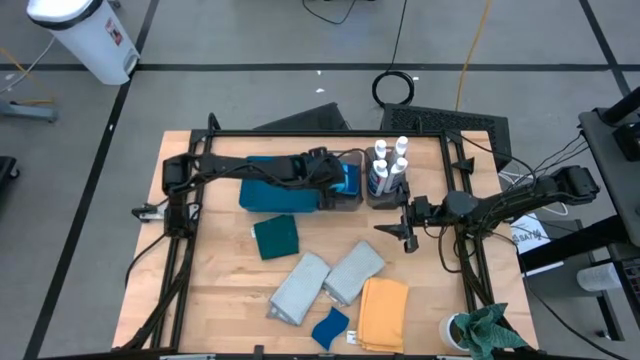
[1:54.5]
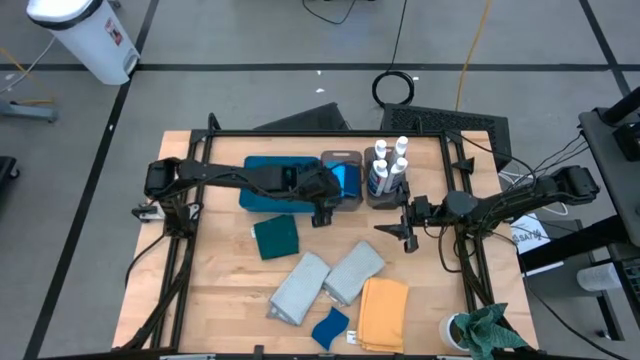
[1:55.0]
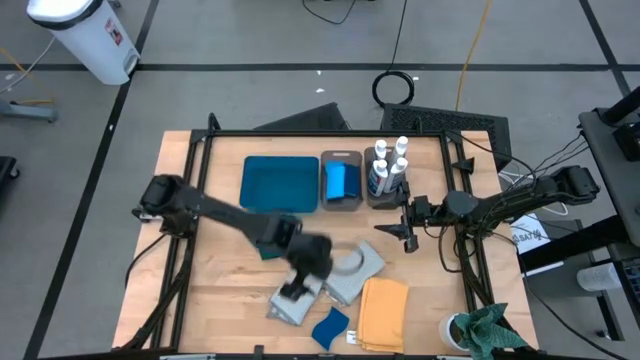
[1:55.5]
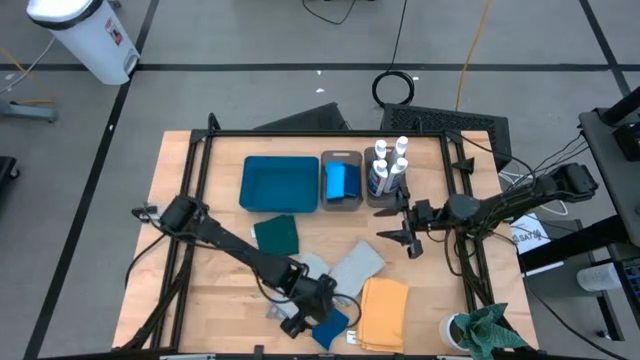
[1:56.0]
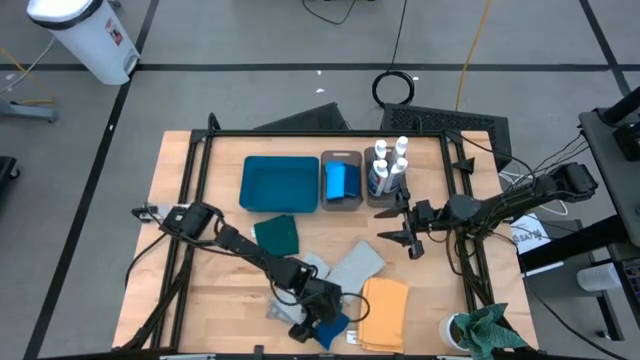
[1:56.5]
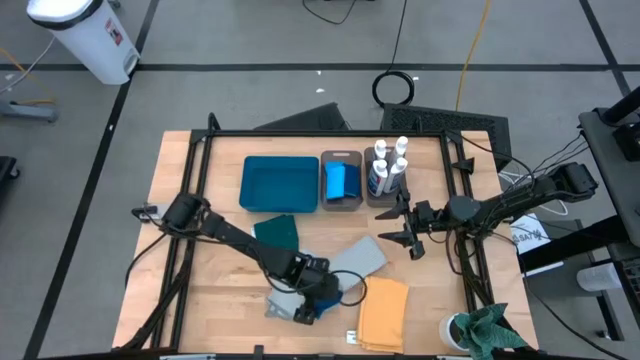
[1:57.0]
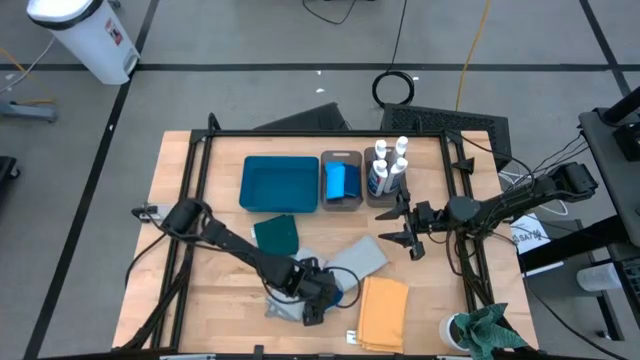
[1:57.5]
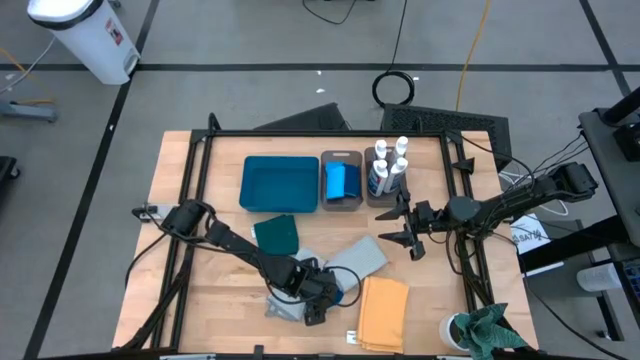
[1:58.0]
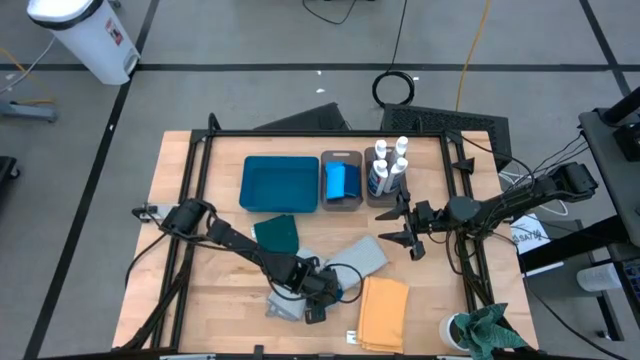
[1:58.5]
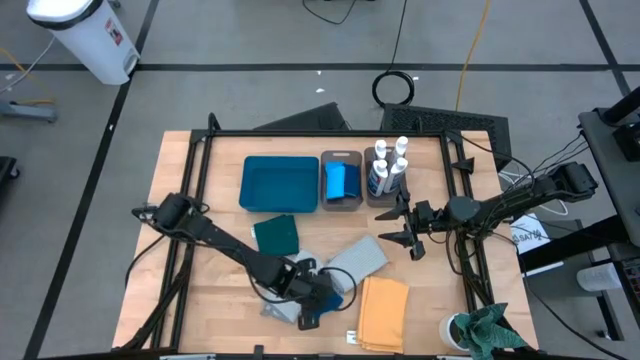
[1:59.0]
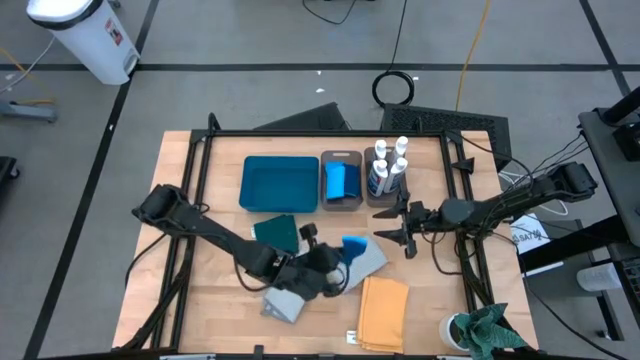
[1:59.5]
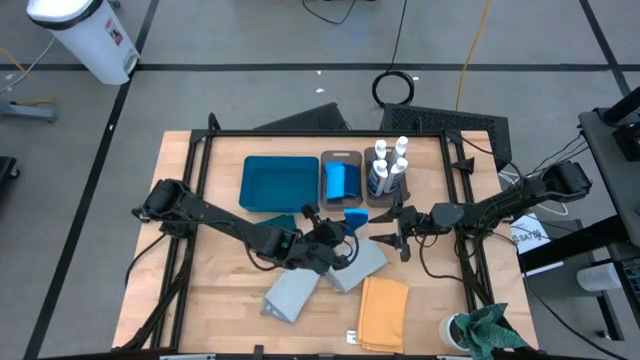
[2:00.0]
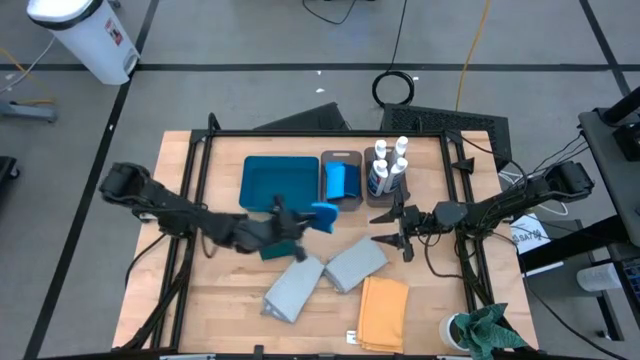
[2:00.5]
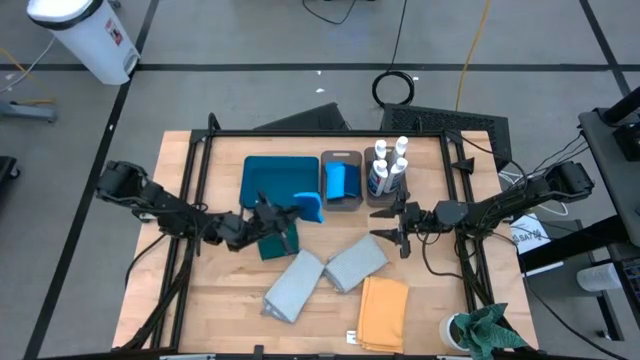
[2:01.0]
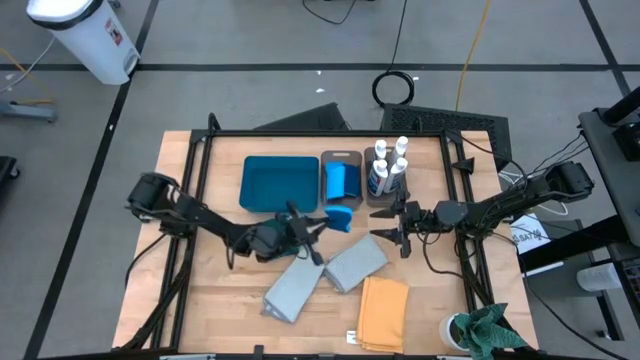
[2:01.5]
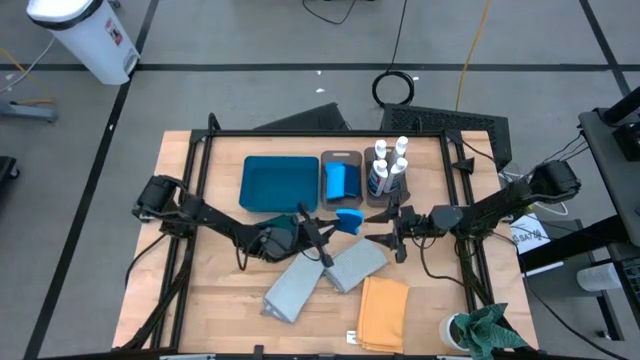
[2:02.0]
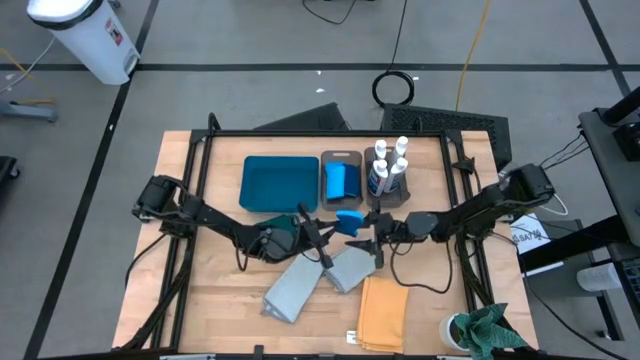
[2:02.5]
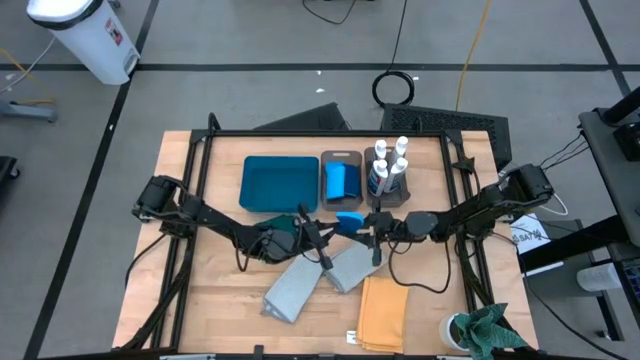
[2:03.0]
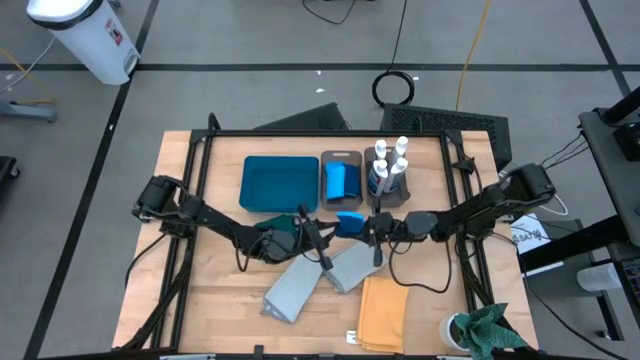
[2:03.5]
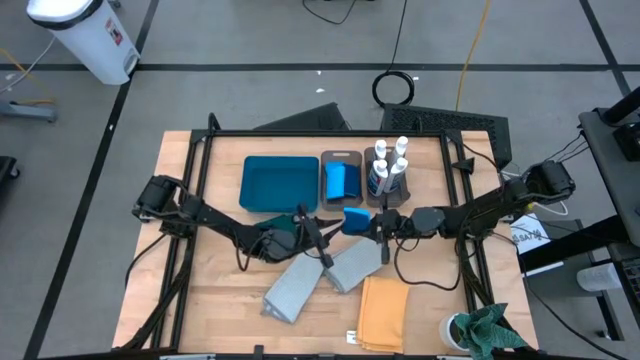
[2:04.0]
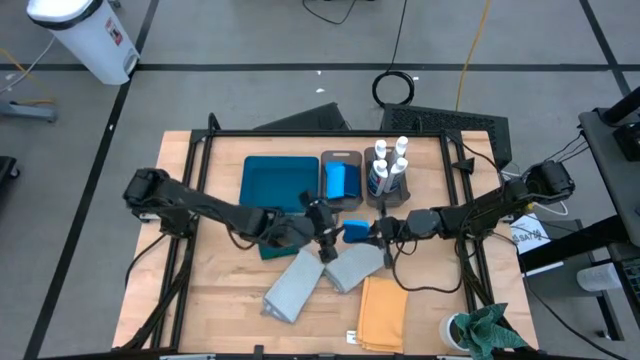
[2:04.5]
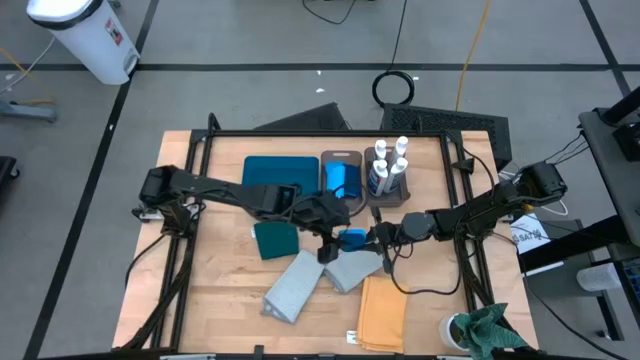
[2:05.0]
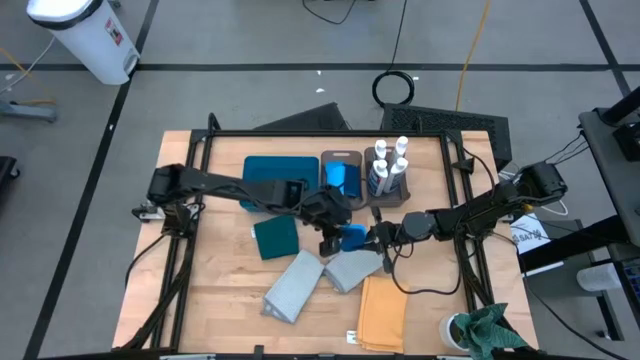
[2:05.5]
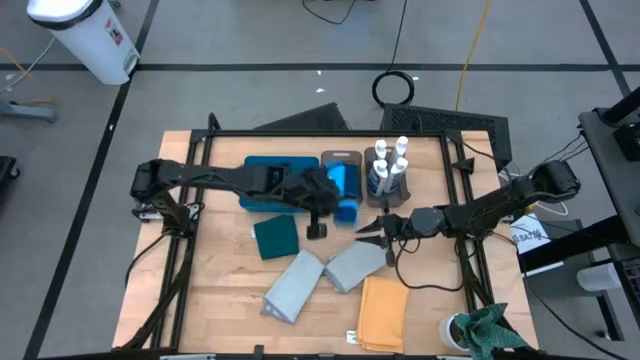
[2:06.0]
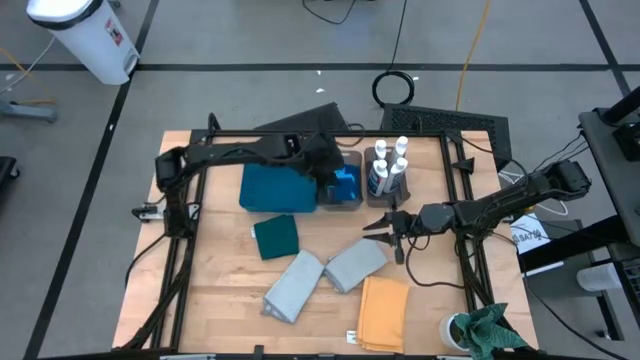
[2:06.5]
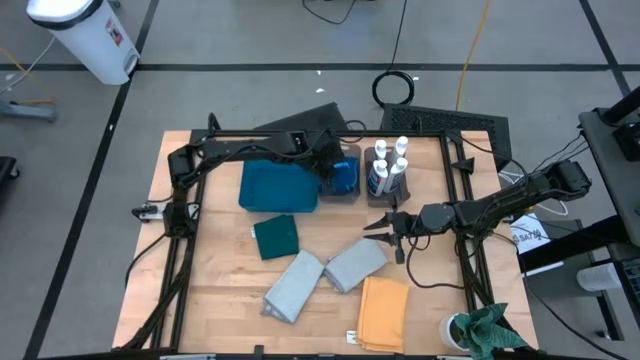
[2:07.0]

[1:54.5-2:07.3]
Task: Pick & Place Kitchen Items
Put the blue sponge into the left black bin

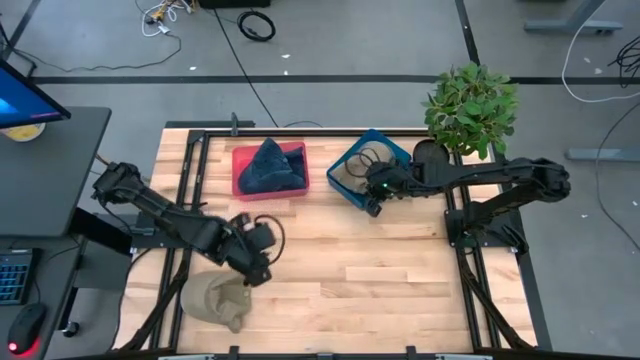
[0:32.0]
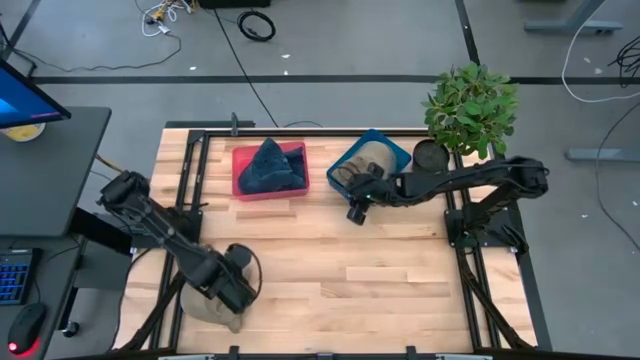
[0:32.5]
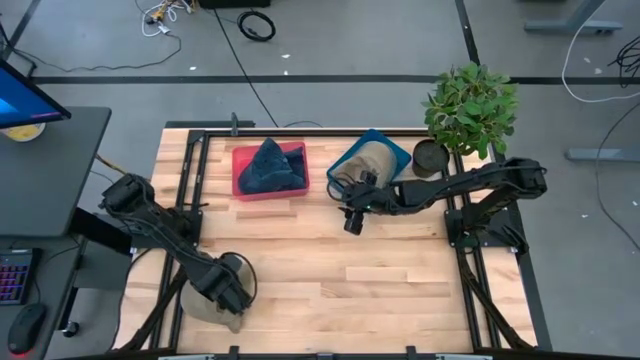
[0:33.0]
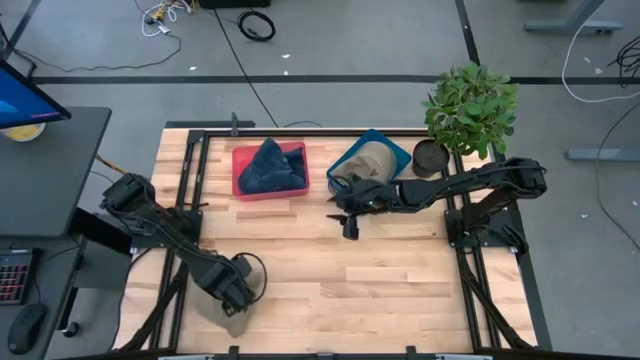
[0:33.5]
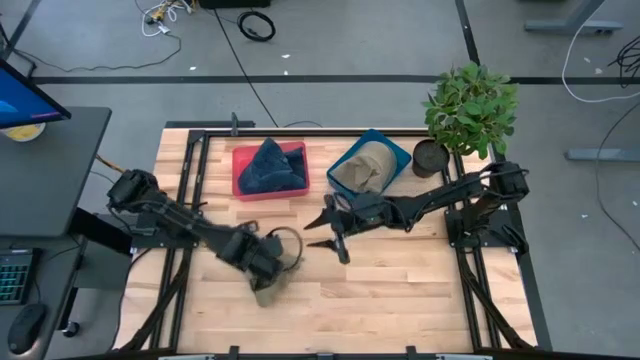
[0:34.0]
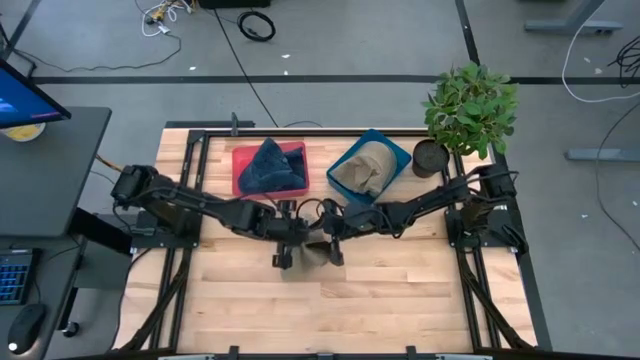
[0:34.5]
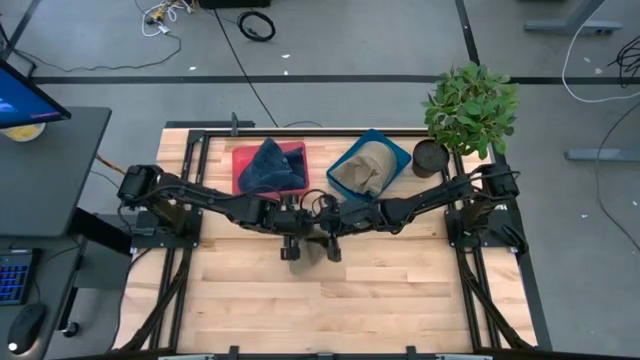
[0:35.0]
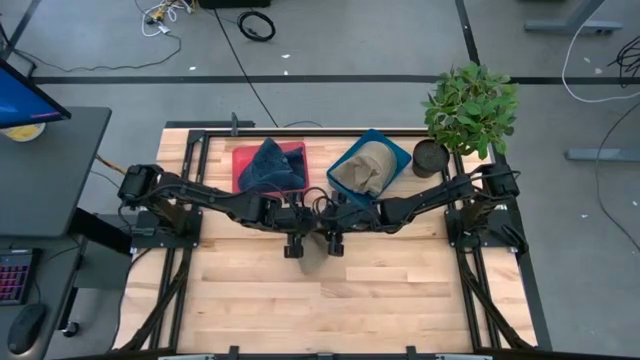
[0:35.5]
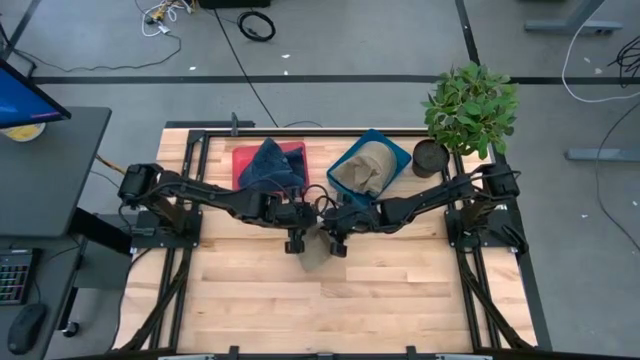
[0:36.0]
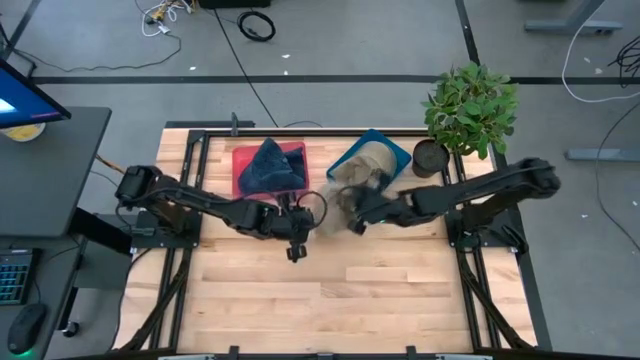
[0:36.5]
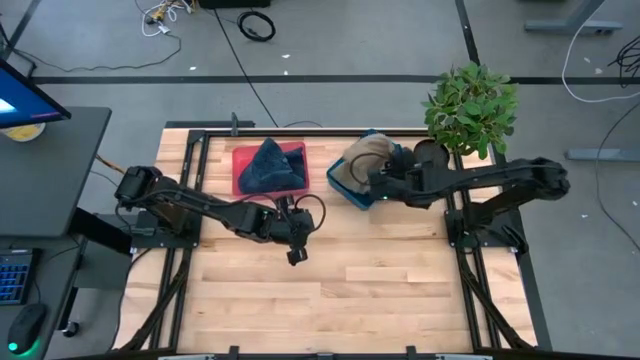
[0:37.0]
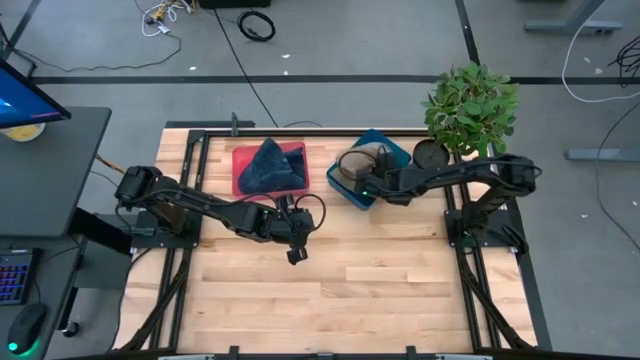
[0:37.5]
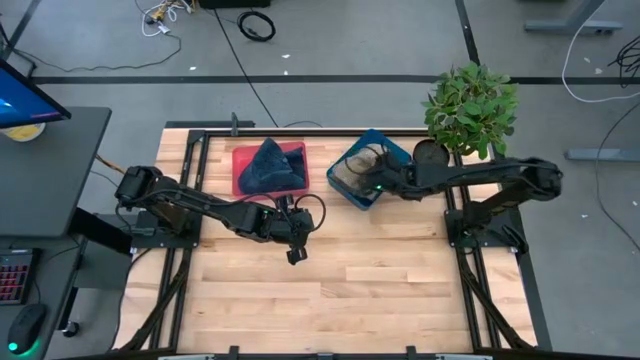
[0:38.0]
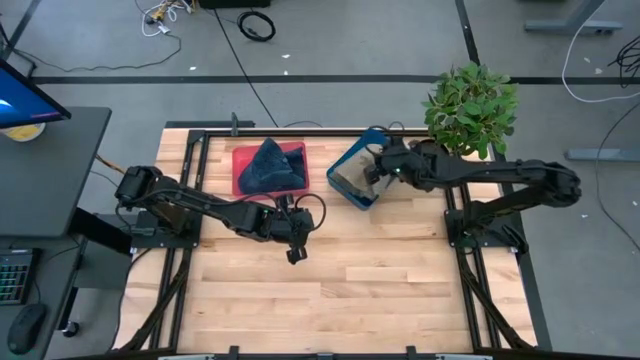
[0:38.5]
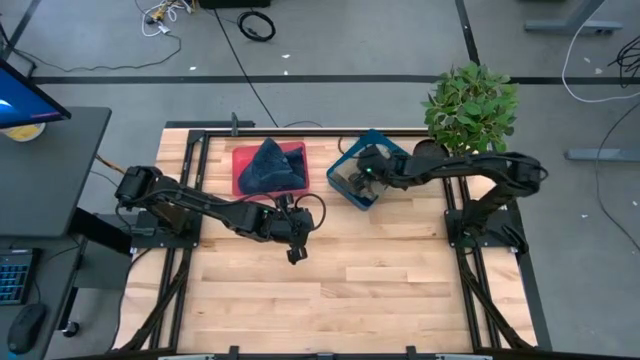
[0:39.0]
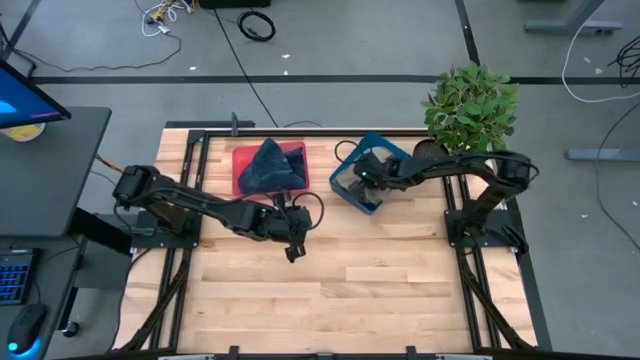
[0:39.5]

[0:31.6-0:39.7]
Task: Pick & Place hat
Put the gray cap into the blue bin
